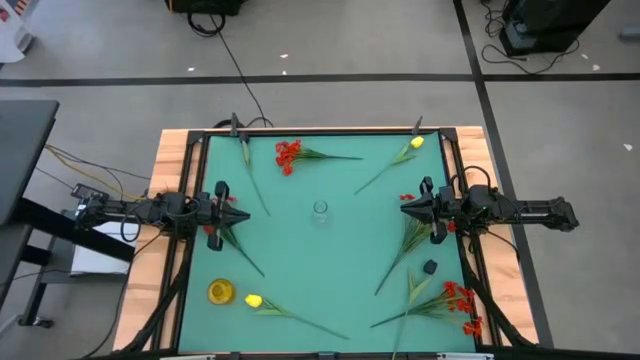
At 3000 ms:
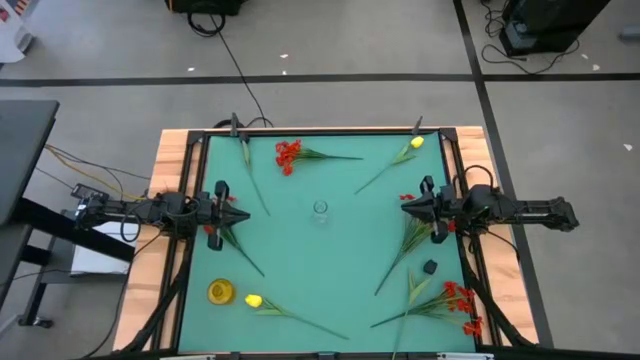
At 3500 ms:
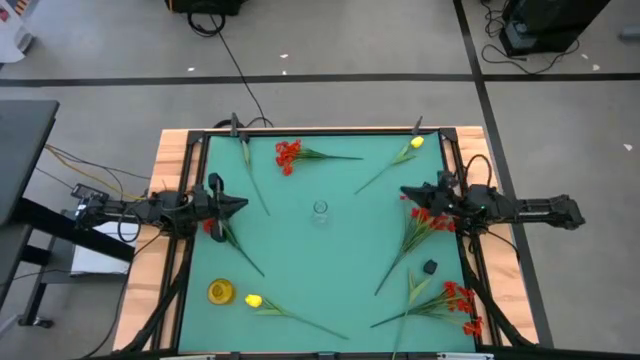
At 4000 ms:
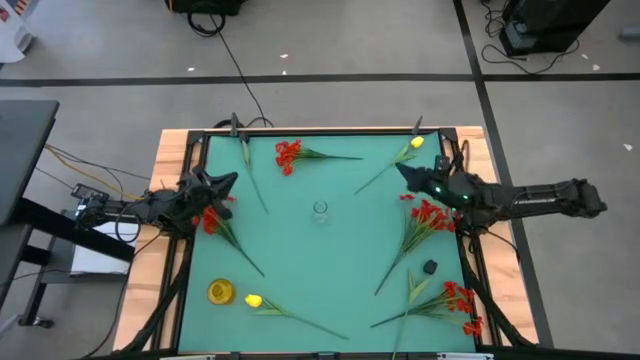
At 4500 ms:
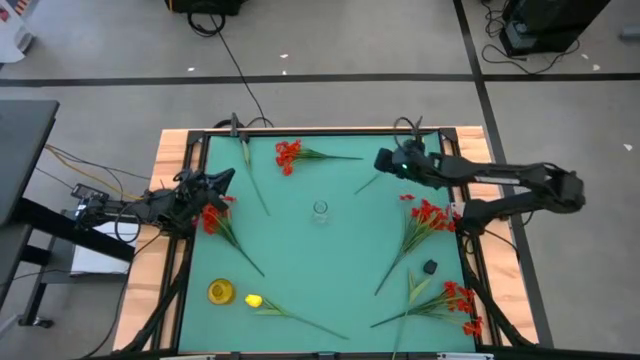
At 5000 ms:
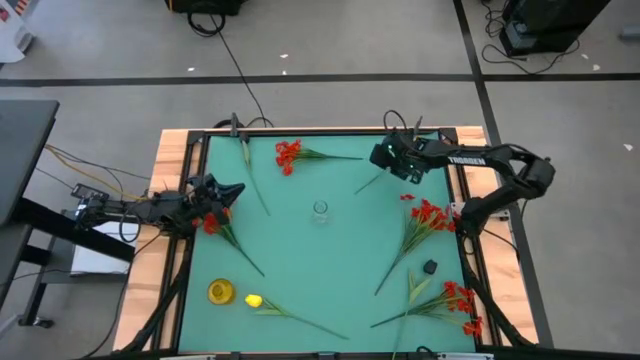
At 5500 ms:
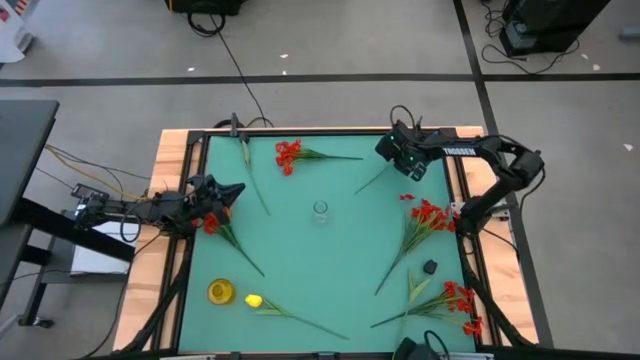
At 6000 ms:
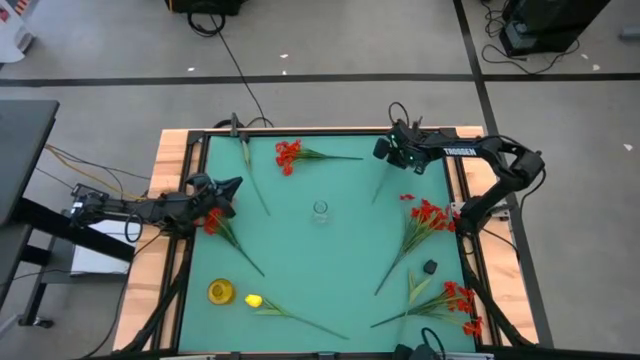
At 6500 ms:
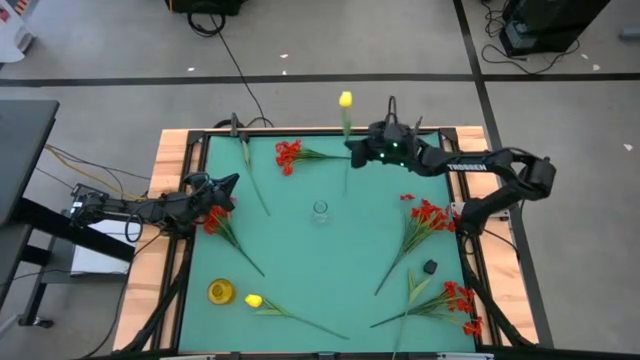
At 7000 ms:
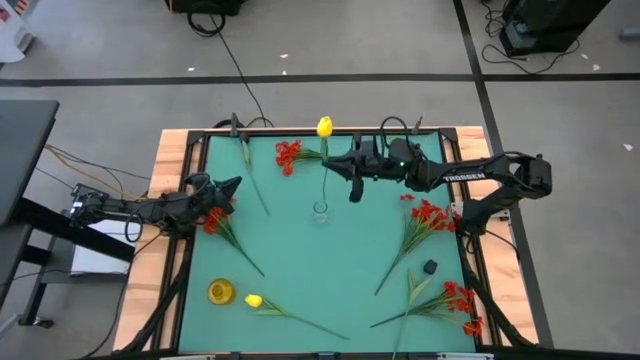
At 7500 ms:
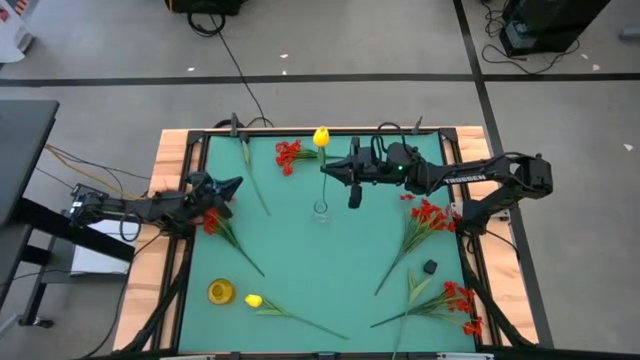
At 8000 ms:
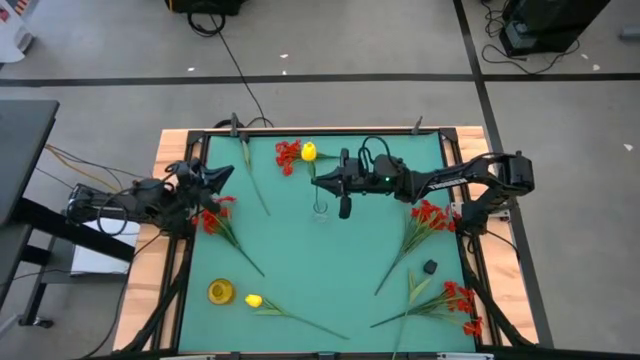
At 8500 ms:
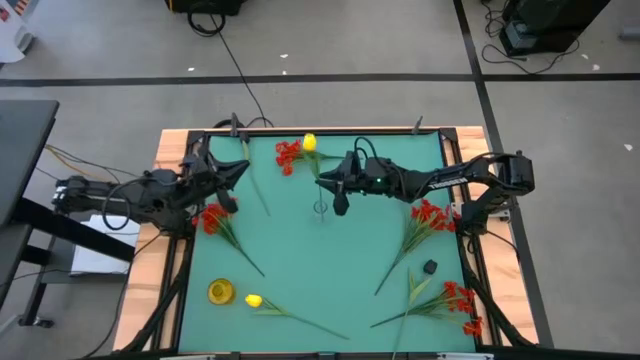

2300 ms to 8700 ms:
Task: Sort flowers into vase by color
Put the yellow tulip into the transparent vase

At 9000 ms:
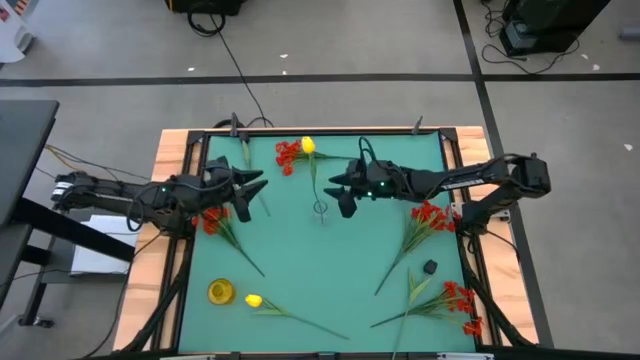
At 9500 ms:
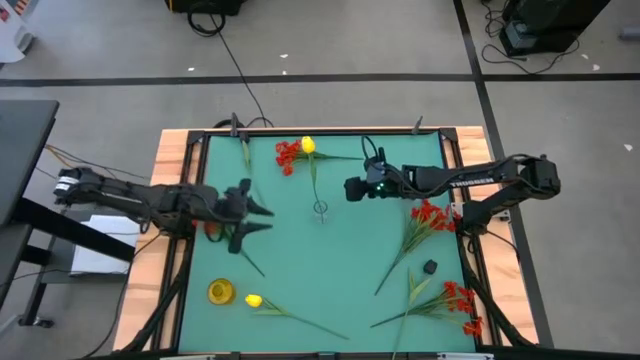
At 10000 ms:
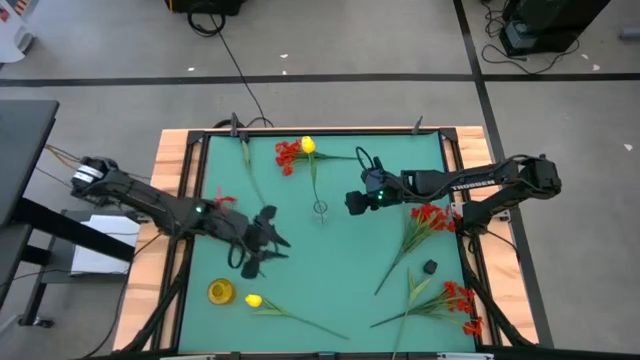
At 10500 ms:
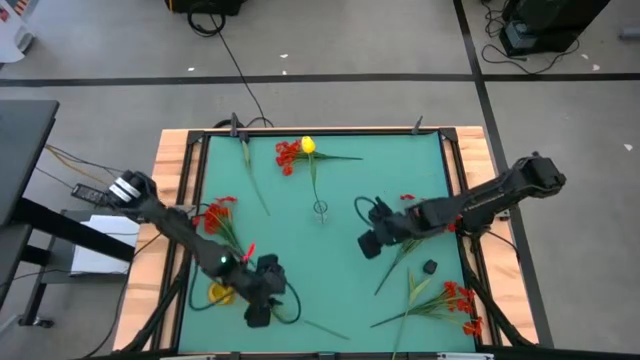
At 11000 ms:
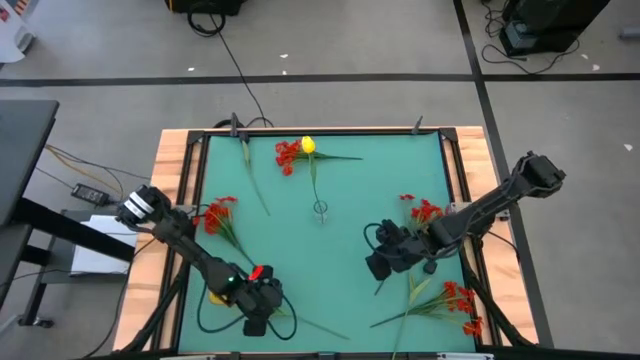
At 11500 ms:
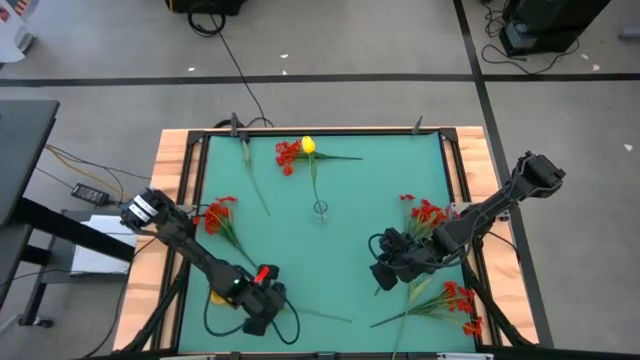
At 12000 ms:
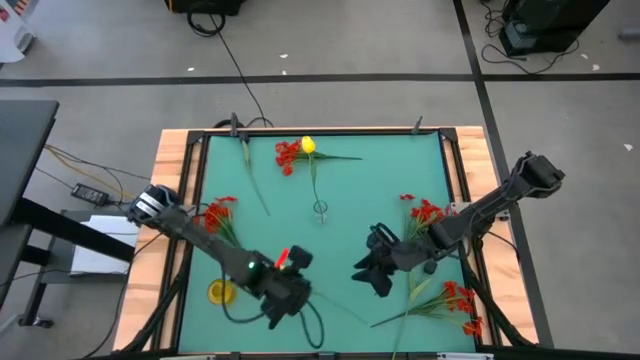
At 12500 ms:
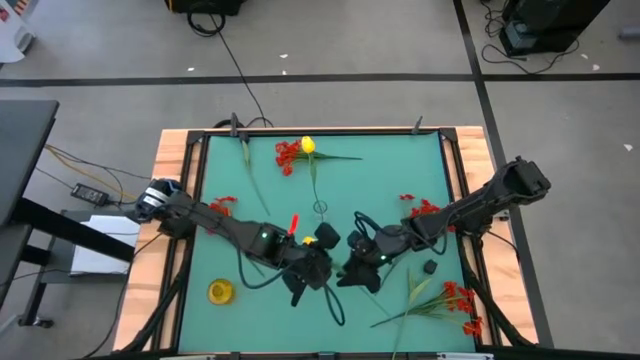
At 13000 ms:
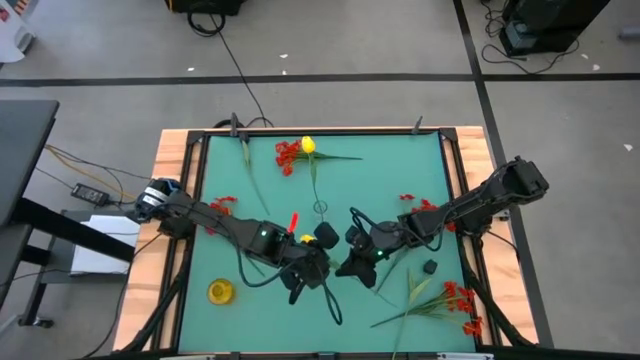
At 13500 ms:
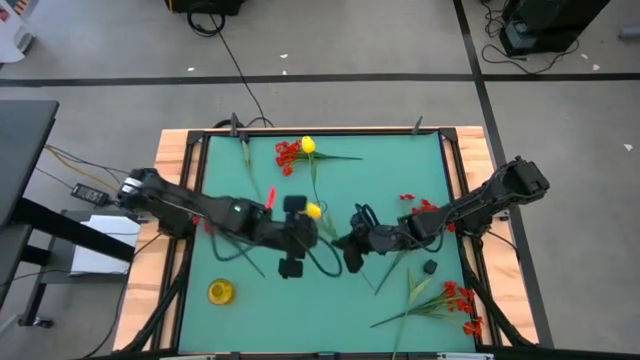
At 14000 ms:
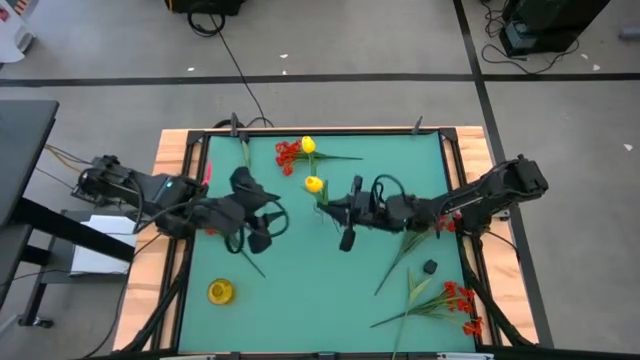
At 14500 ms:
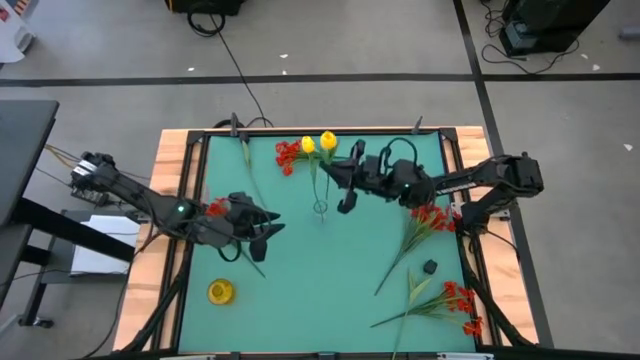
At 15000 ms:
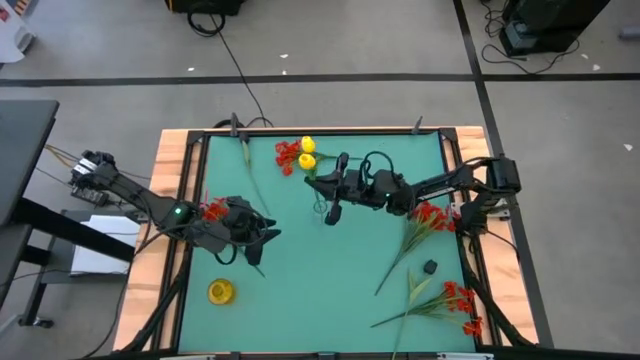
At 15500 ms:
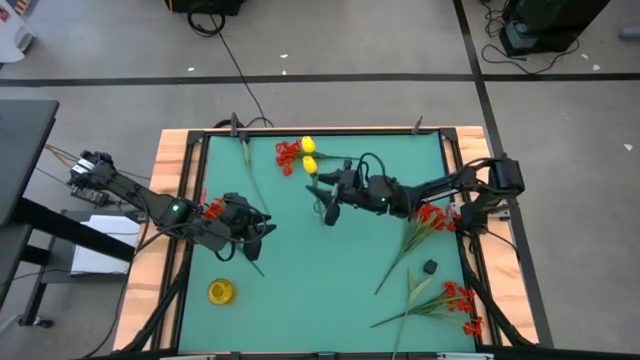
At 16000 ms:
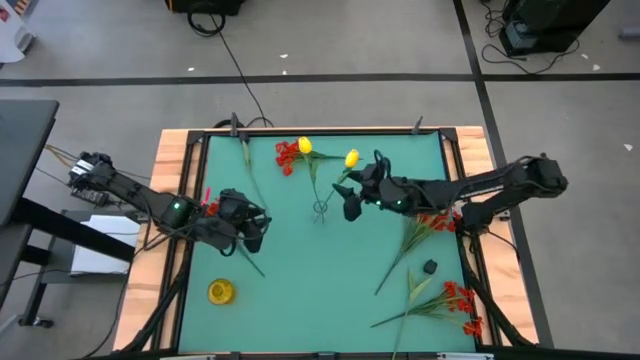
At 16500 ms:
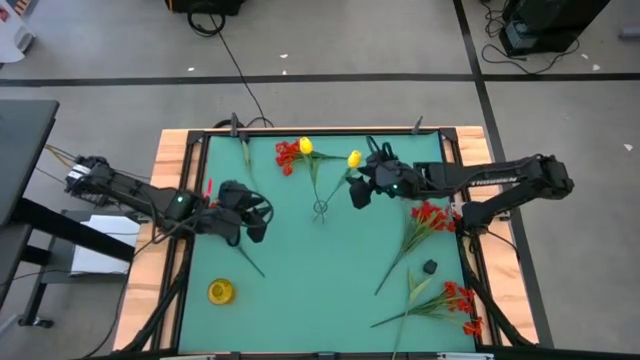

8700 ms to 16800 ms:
Put the yellow tulip into the transparent vase

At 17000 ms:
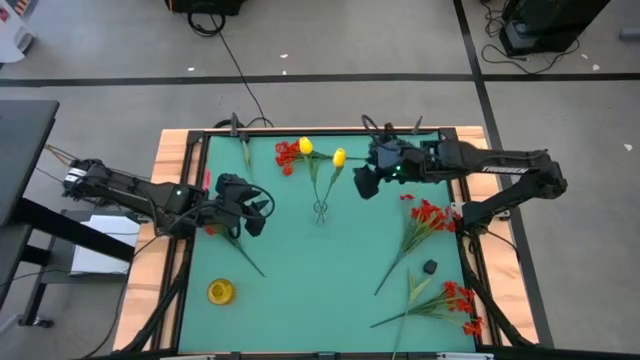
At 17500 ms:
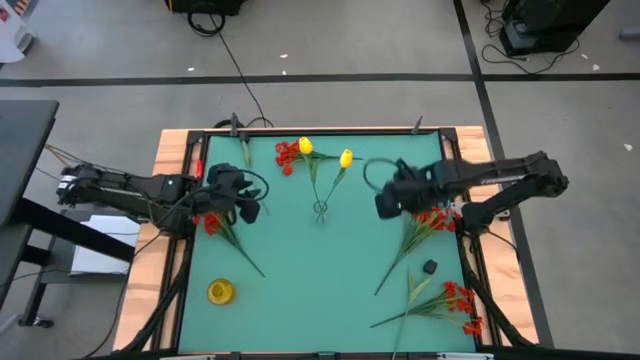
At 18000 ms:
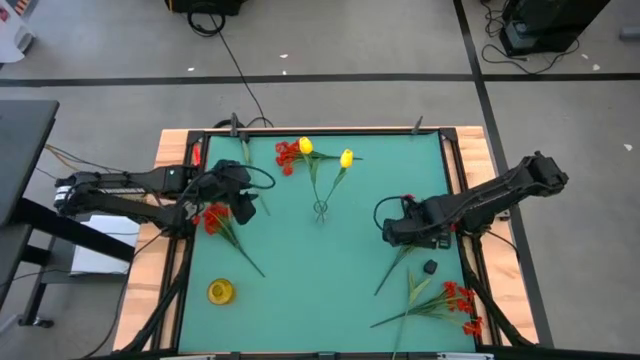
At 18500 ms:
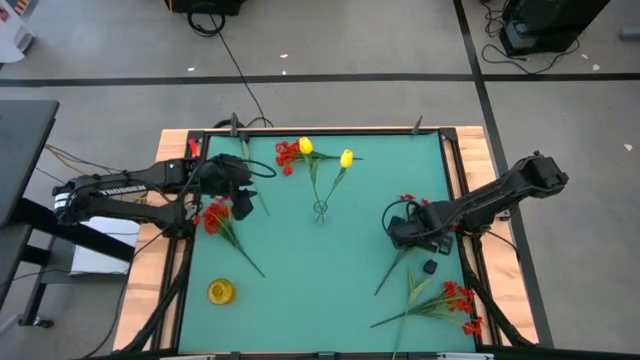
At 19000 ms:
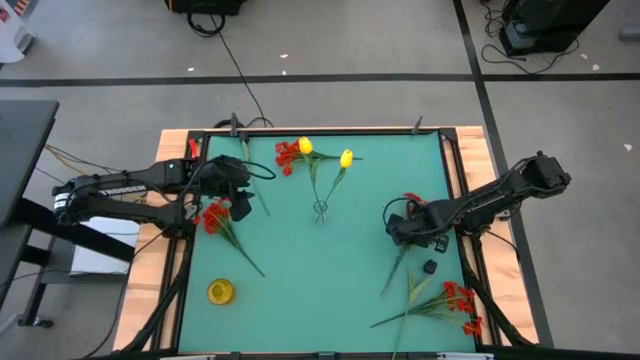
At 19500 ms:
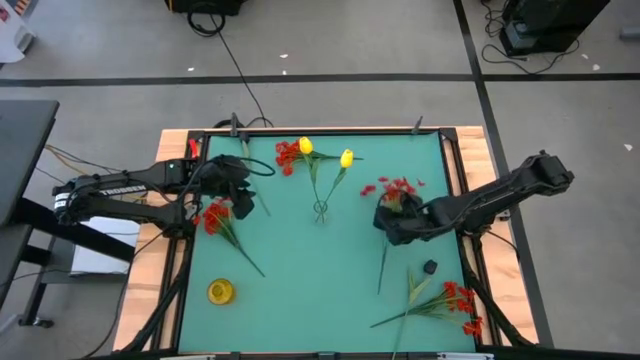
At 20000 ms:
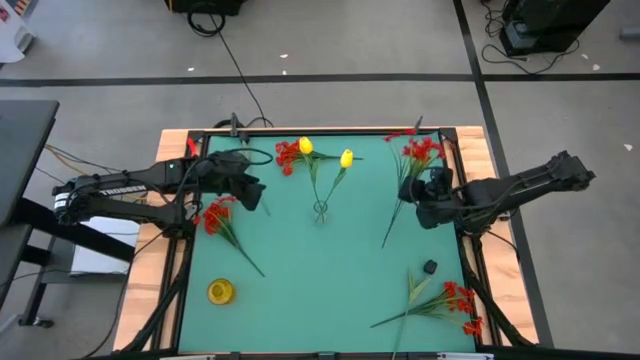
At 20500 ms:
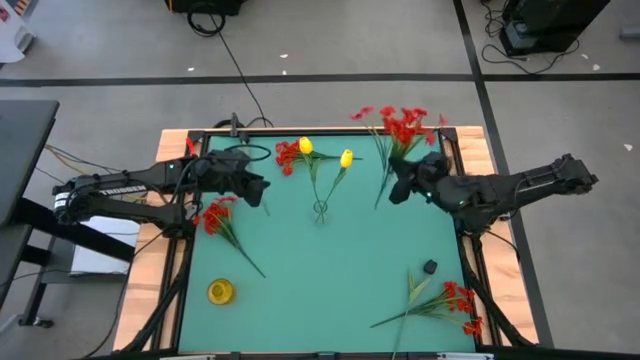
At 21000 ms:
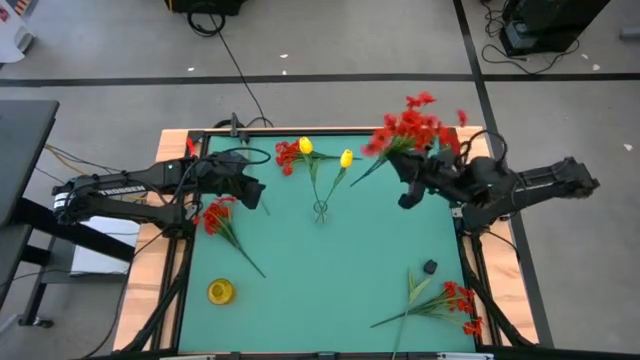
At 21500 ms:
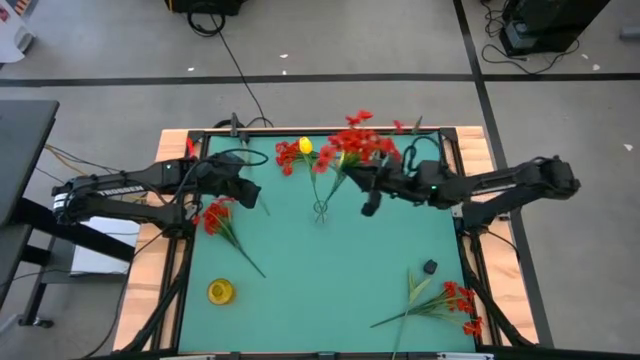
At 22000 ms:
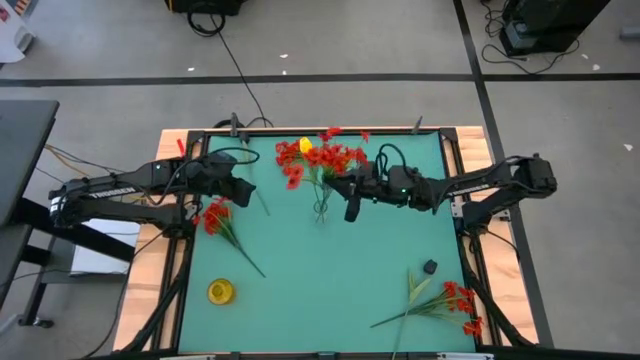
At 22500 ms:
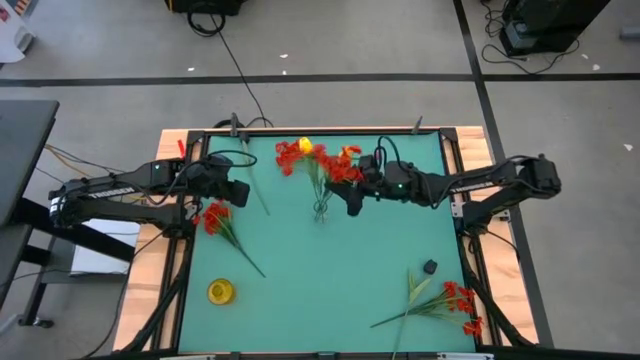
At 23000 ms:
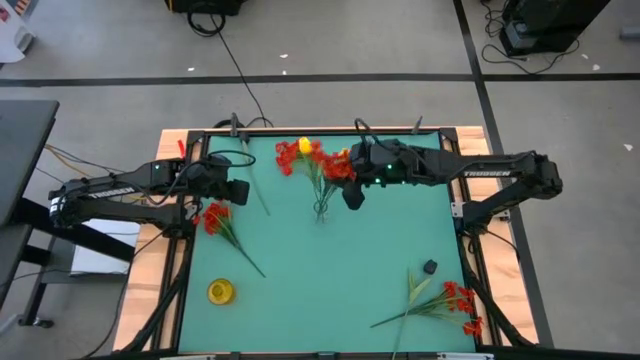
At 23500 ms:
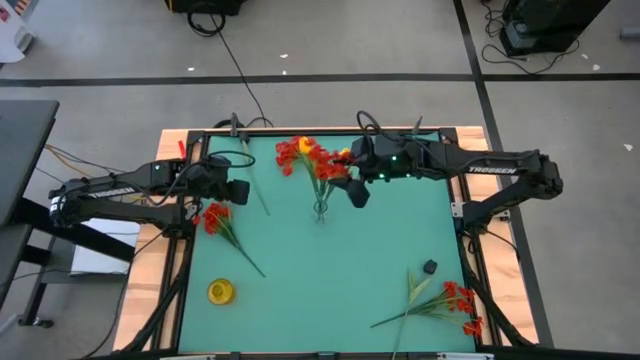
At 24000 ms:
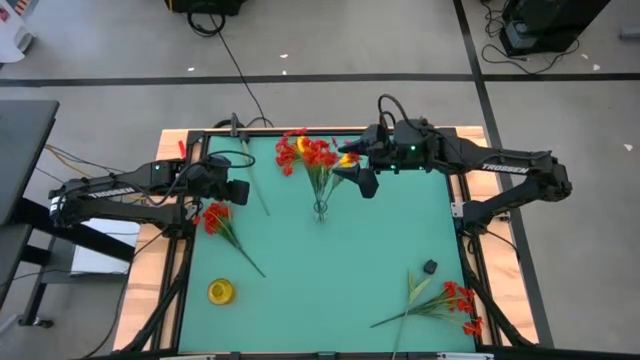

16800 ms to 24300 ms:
Put the red flowers into the transparent vase
